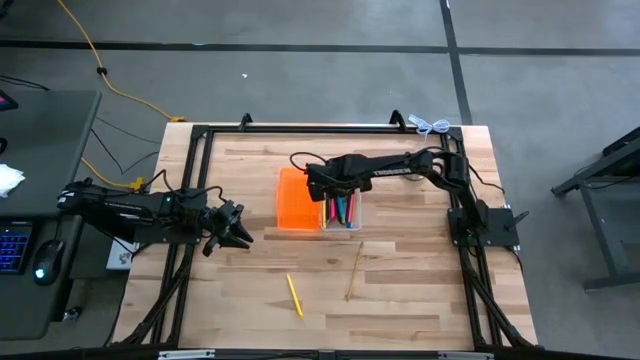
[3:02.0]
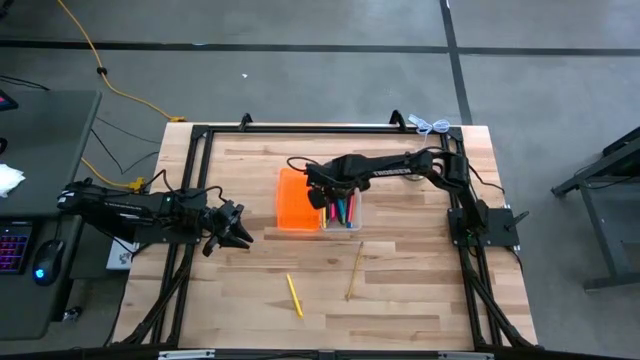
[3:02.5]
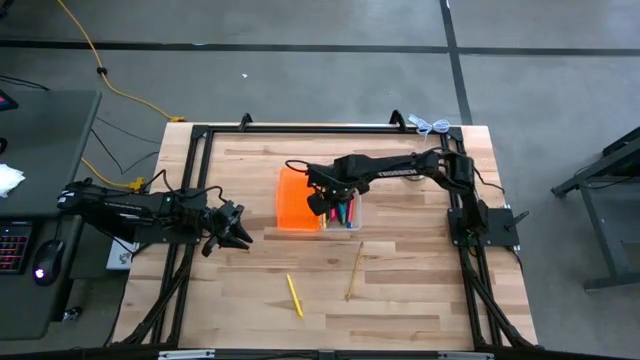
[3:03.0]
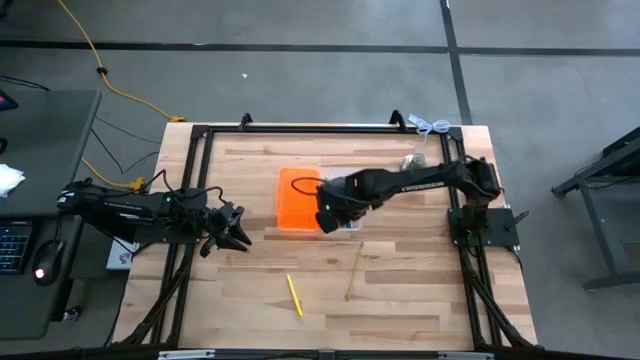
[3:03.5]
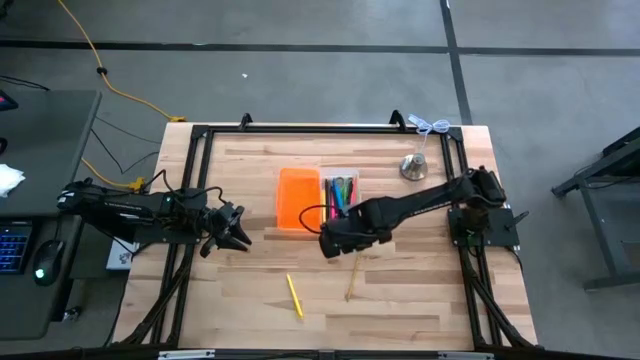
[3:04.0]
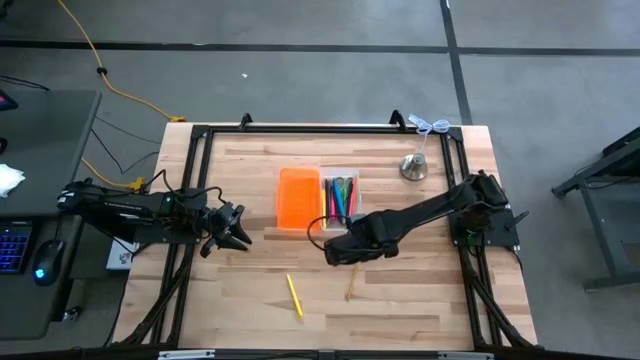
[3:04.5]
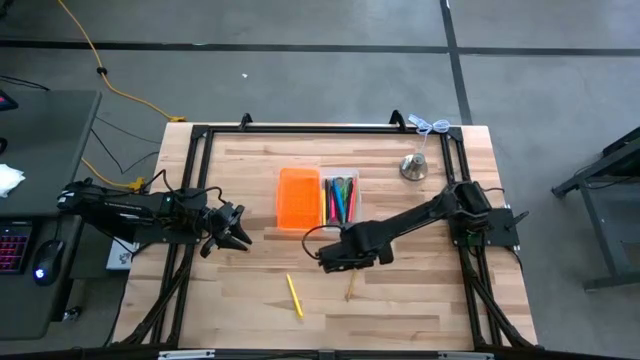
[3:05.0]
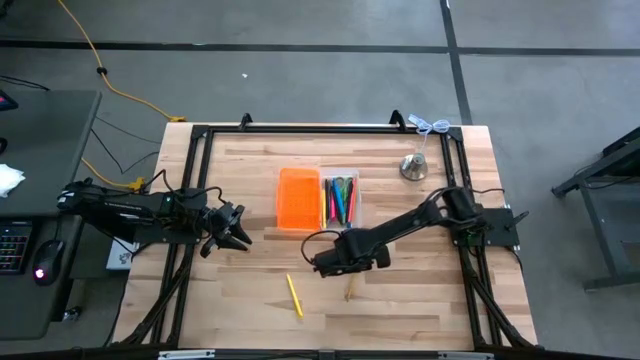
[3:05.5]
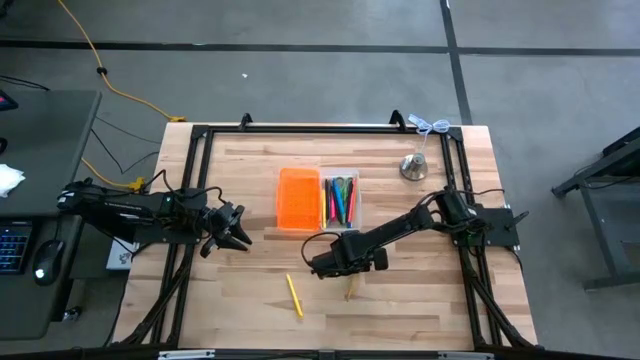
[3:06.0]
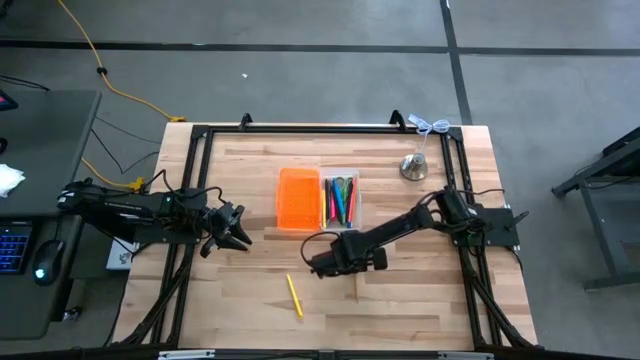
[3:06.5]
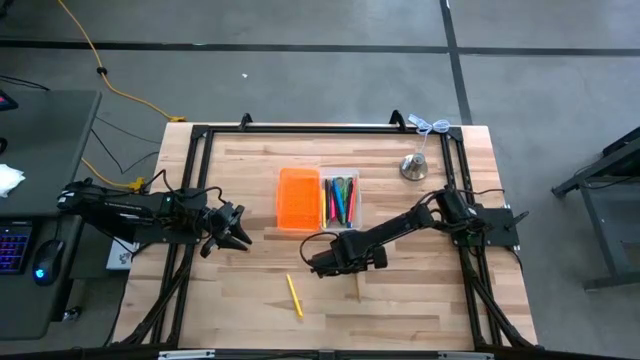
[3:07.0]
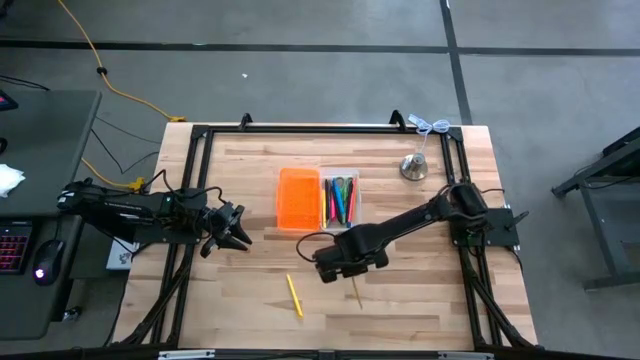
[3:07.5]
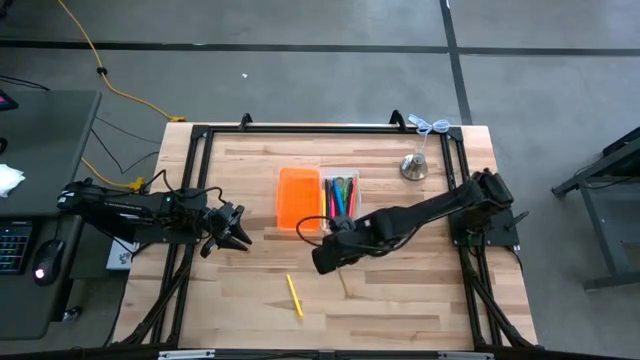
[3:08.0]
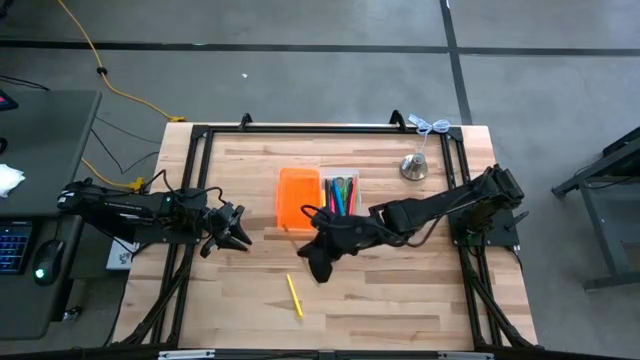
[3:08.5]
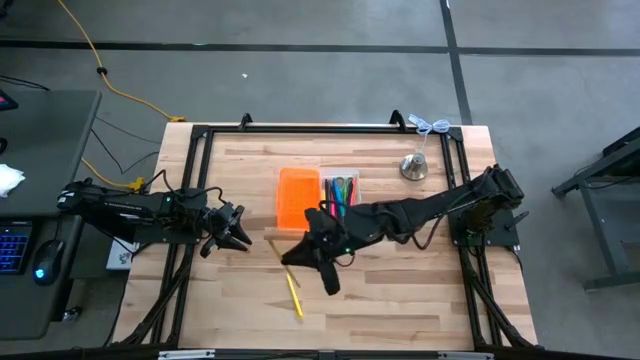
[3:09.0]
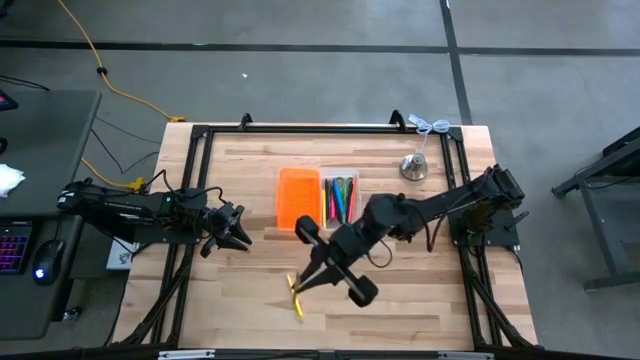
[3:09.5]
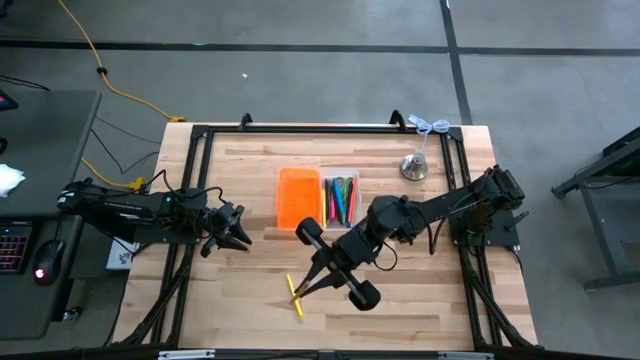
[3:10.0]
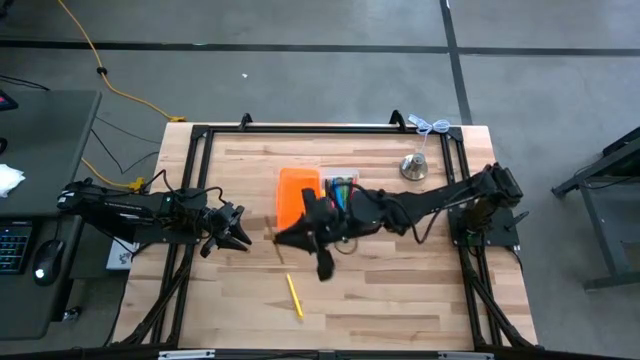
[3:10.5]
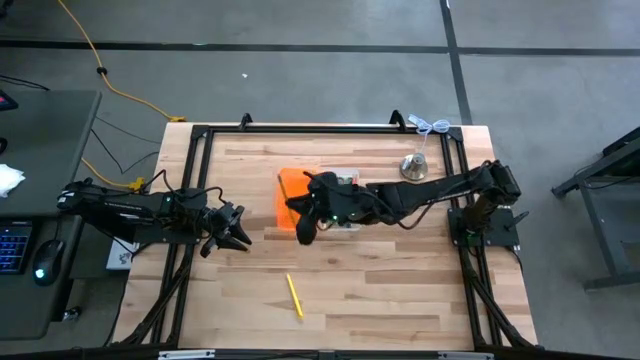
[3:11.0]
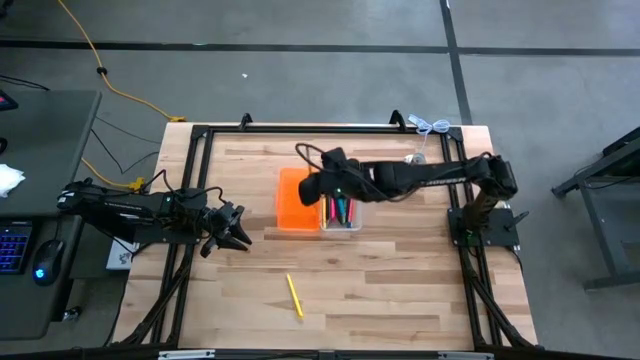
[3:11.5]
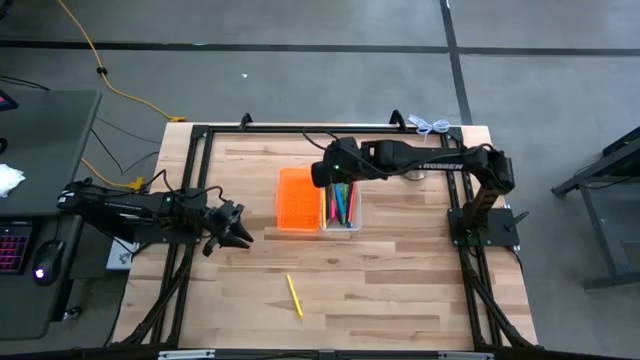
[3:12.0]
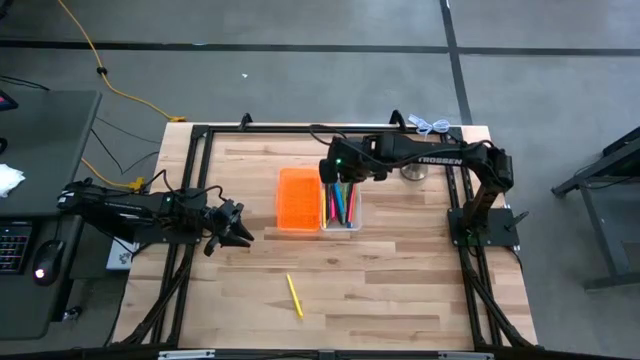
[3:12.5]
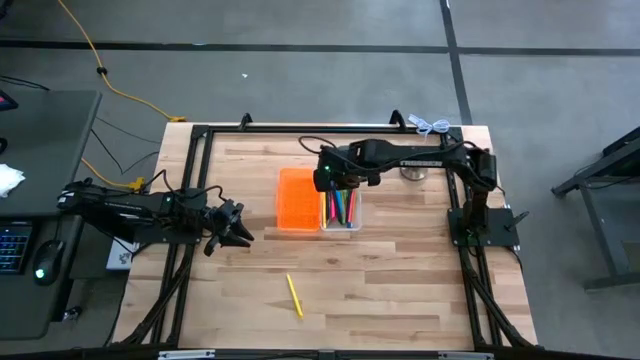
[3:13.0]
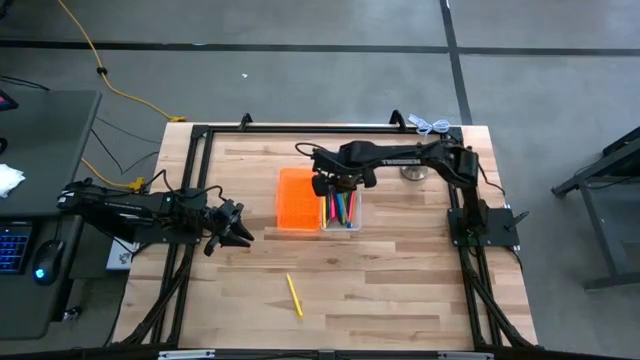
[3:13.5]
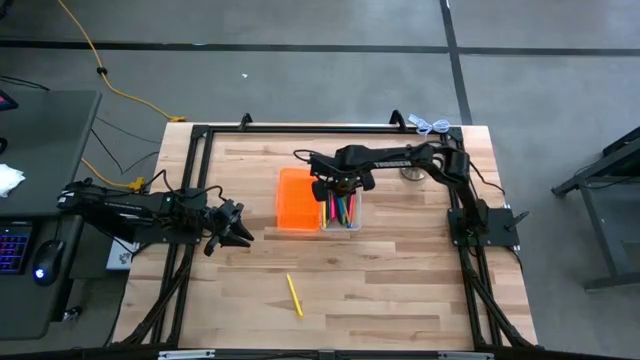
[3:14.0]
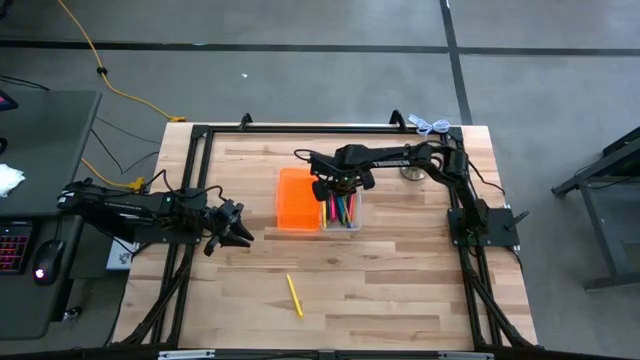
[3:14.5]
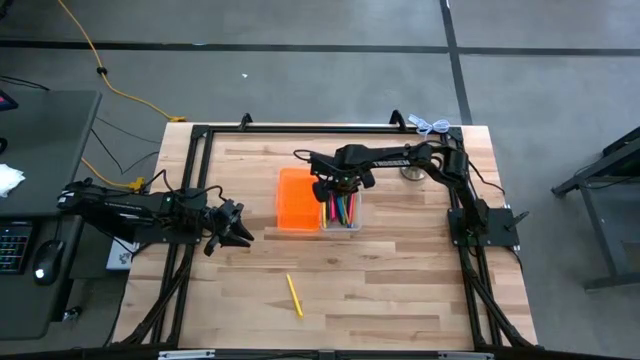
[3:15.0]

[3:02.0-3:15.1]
Task: Pick & place school supplies into a supply box
Put the yellow pencil into the supply box

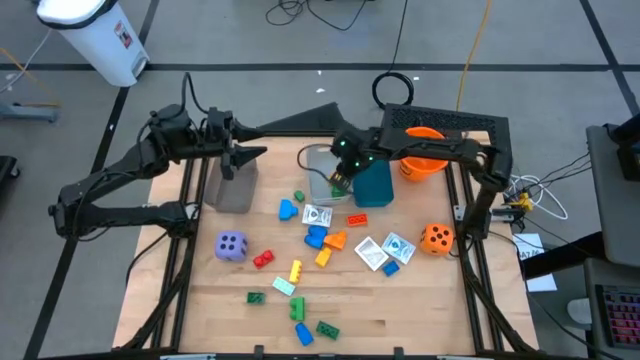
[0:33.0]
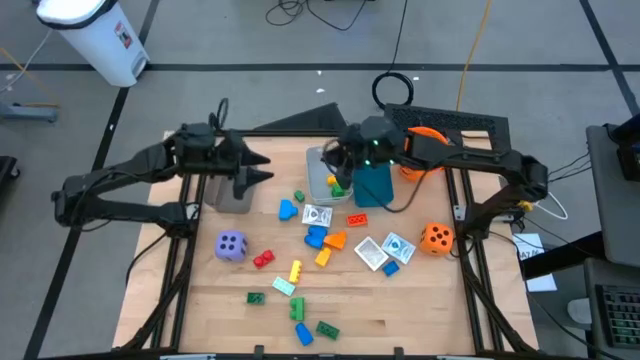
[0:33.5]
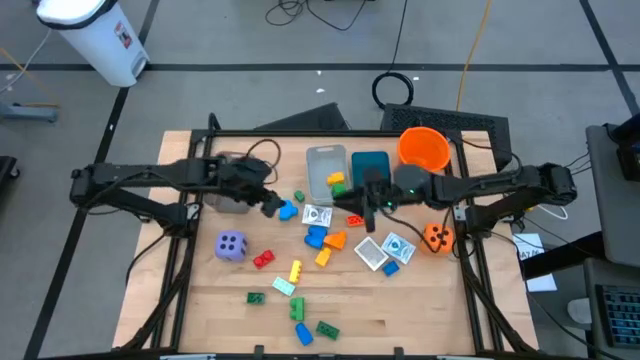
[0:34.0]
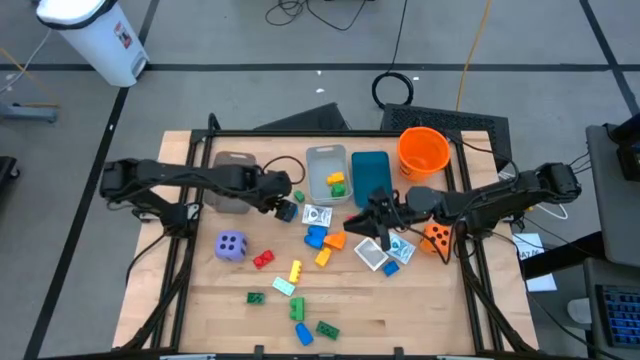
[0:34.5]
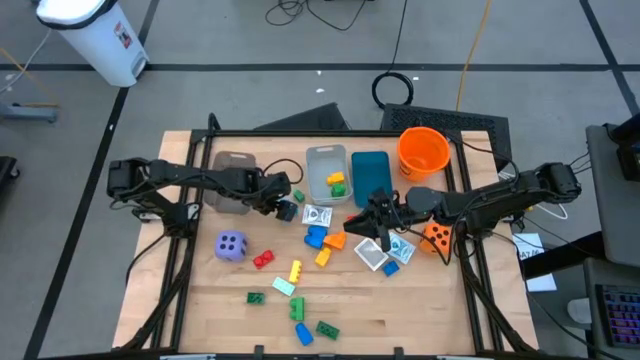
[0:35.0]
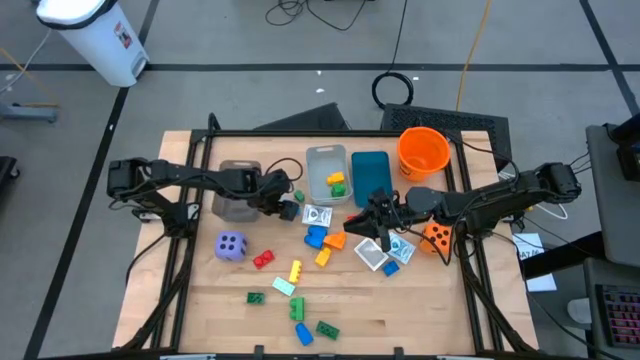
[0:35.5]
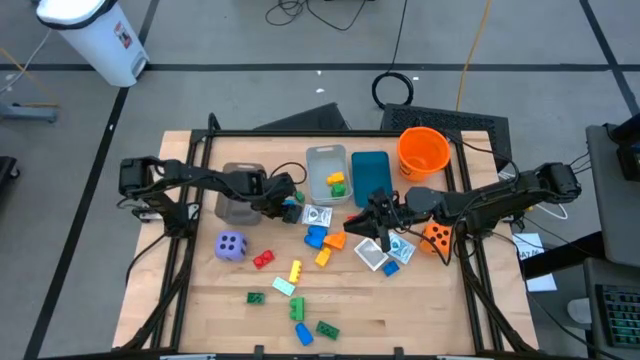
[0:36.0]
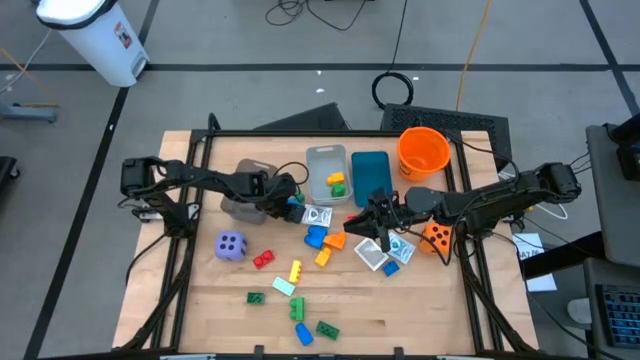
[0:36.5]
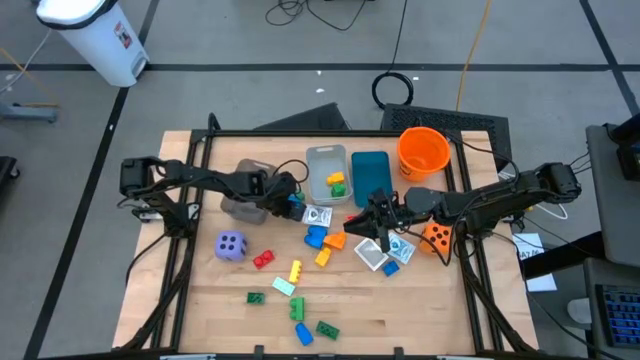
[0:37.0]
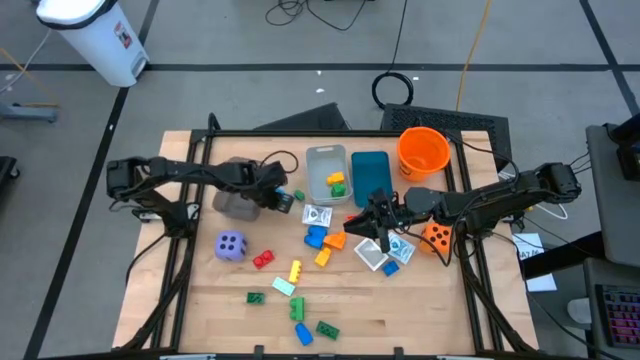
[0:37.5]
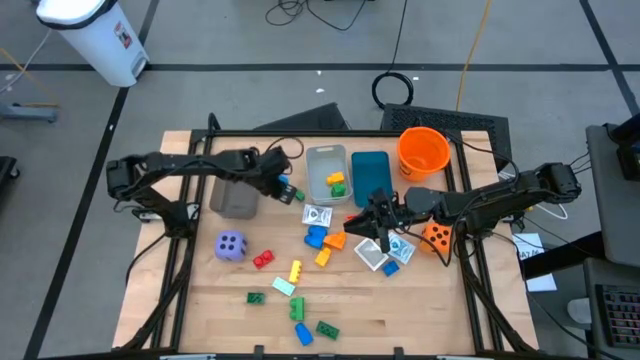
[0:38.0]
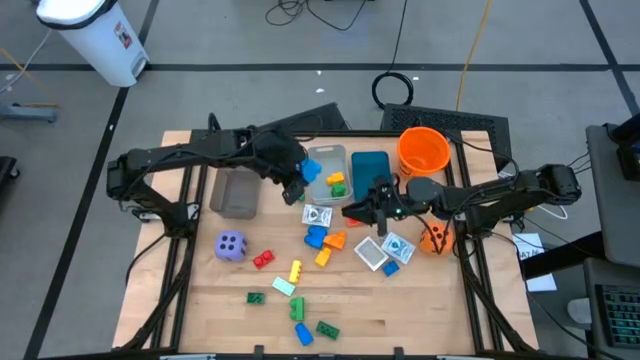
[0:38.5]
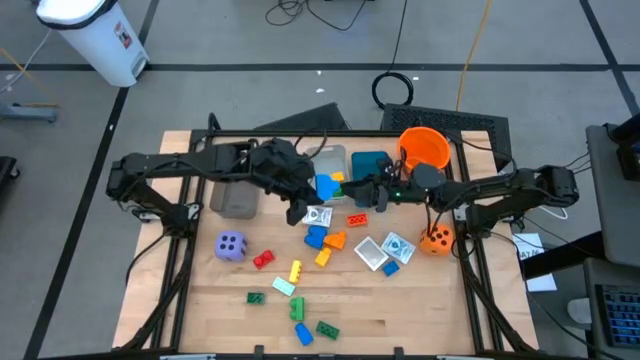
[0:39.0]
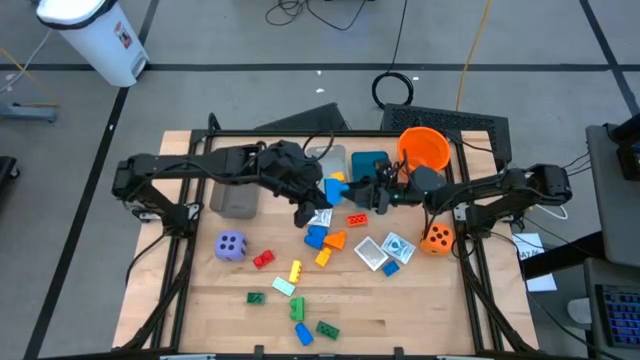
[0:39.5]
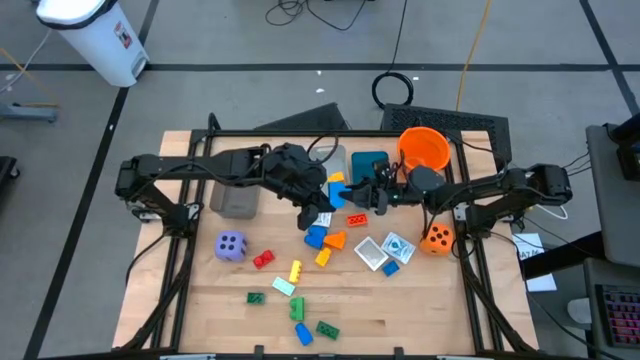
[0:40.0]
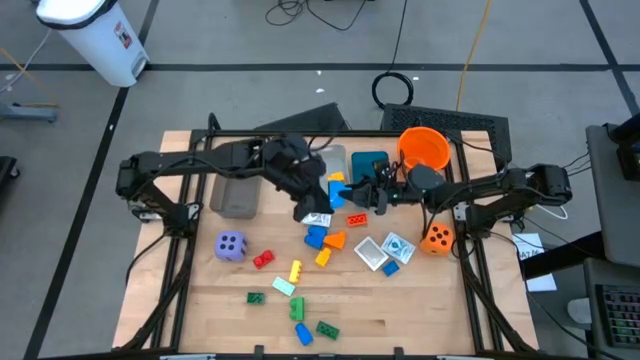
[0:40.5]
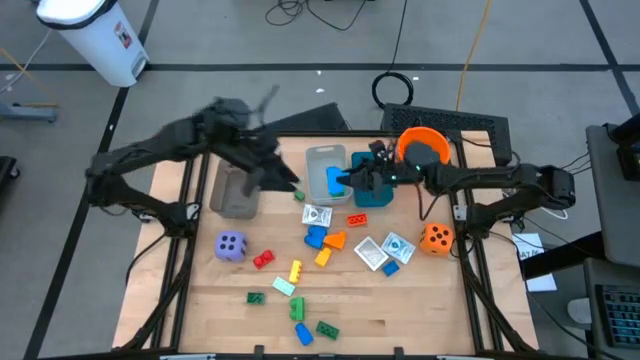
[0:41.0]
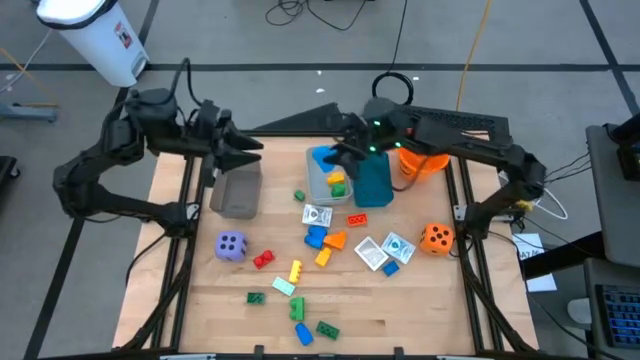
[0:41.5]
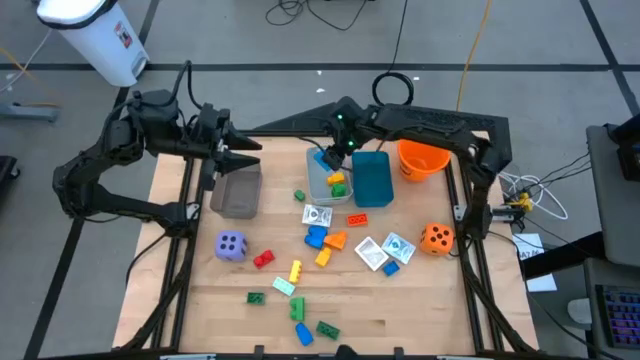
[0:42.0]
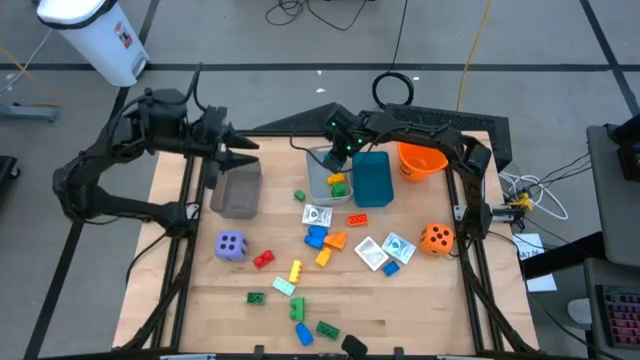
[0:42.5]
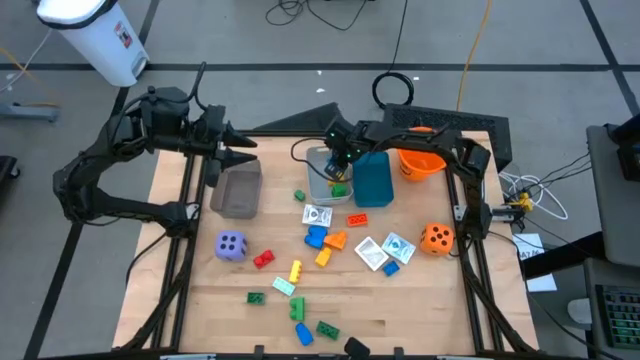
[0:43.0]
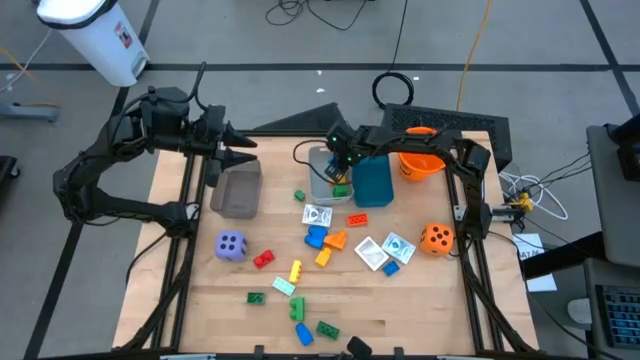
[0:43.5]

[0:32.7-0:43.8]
Task: Pick & Place Toys
Put the left blue game piece into the gray bin
